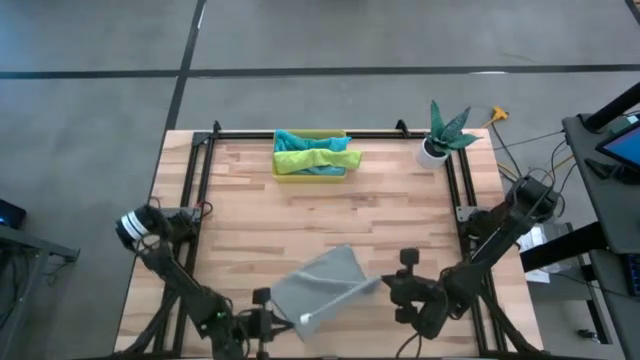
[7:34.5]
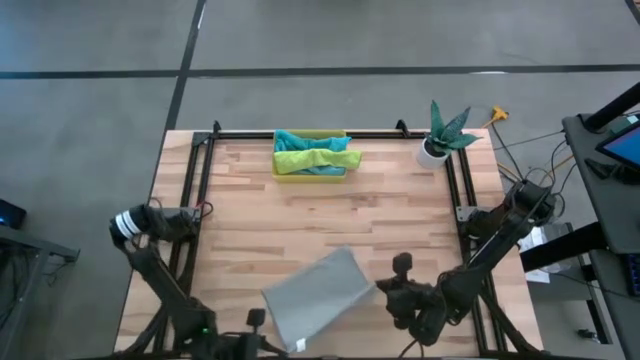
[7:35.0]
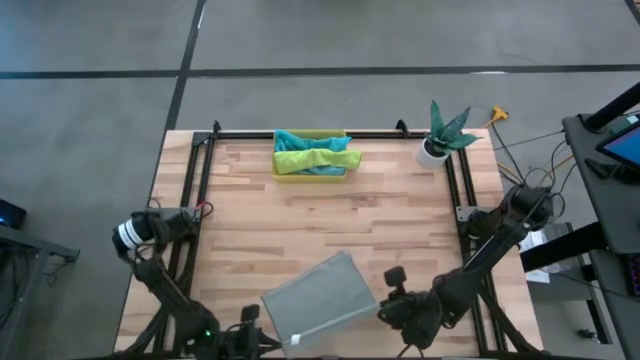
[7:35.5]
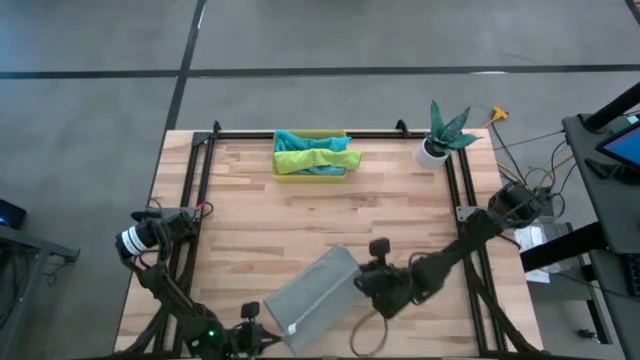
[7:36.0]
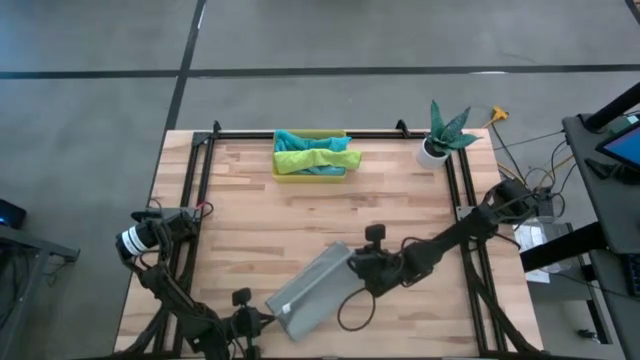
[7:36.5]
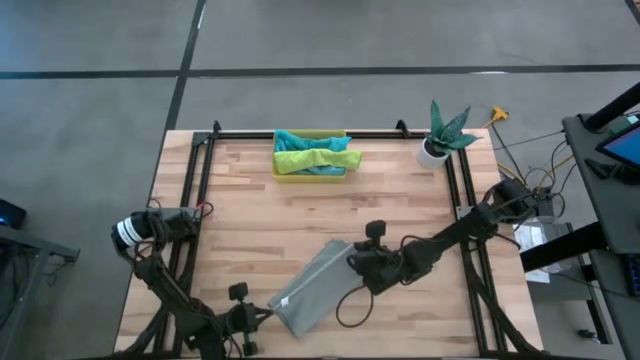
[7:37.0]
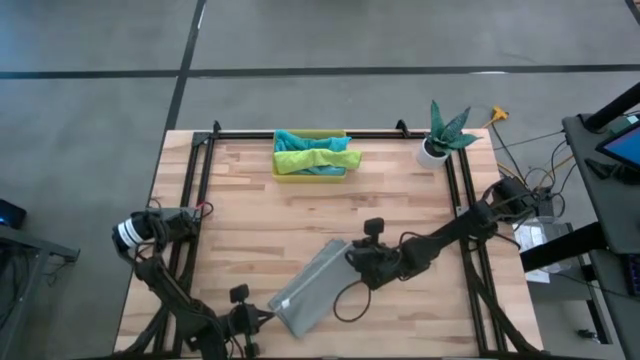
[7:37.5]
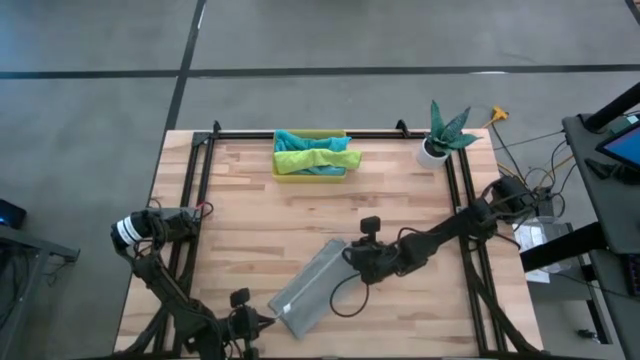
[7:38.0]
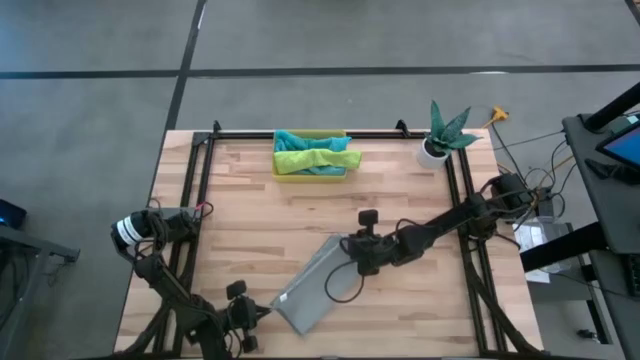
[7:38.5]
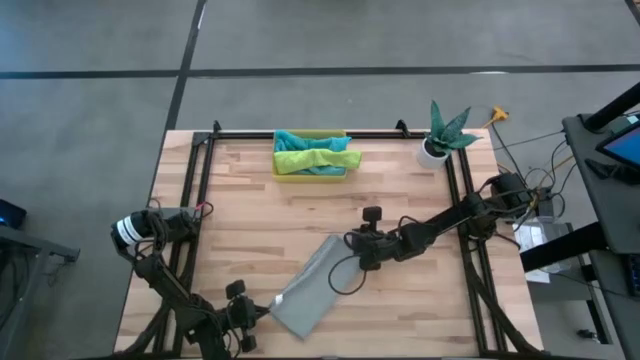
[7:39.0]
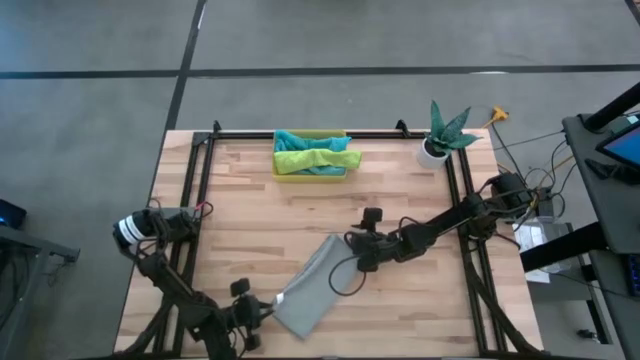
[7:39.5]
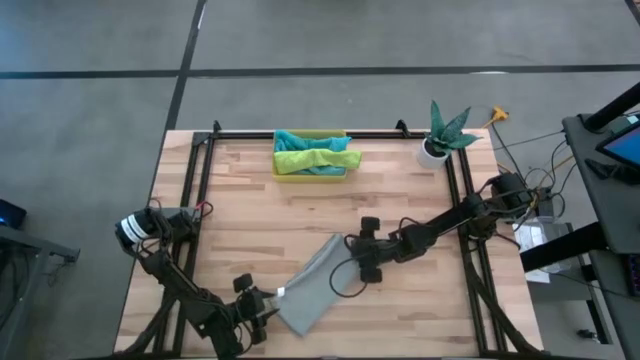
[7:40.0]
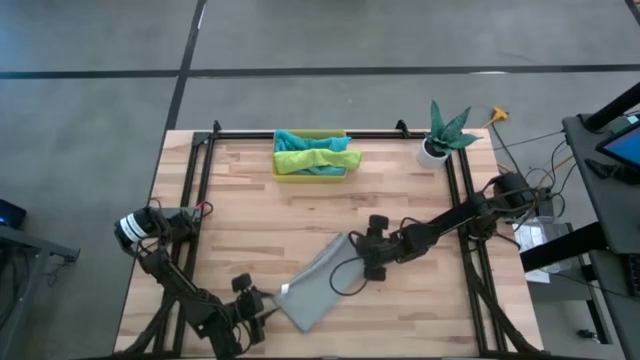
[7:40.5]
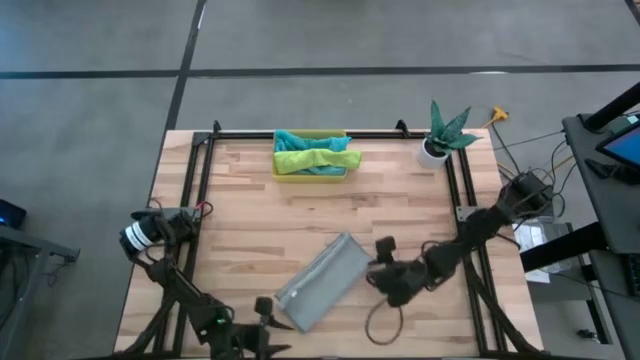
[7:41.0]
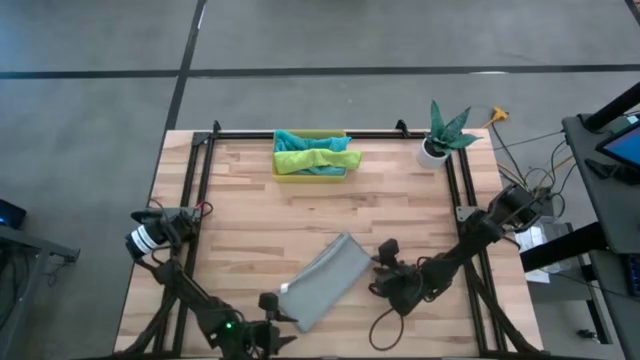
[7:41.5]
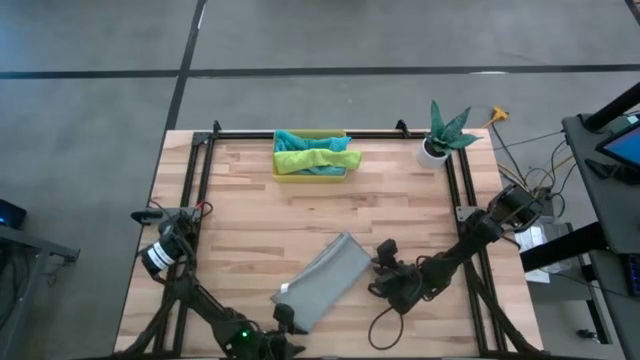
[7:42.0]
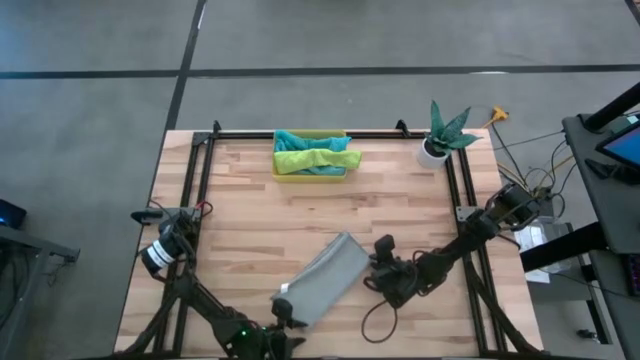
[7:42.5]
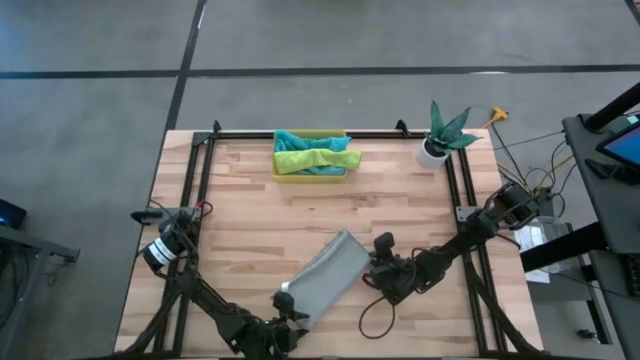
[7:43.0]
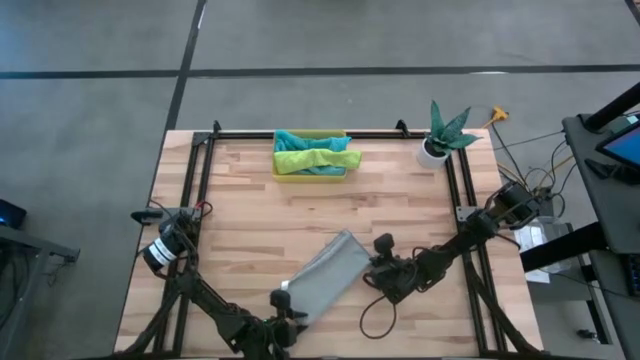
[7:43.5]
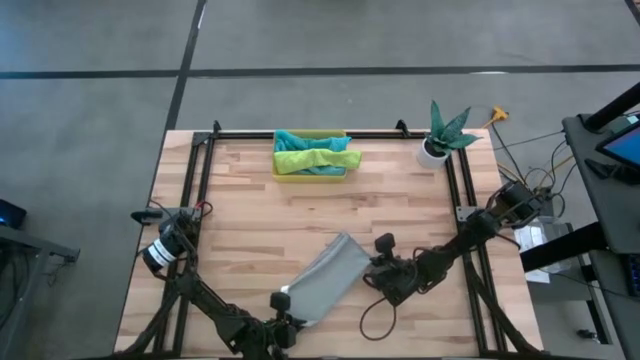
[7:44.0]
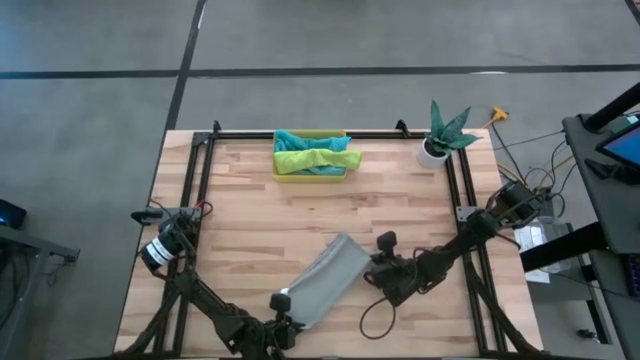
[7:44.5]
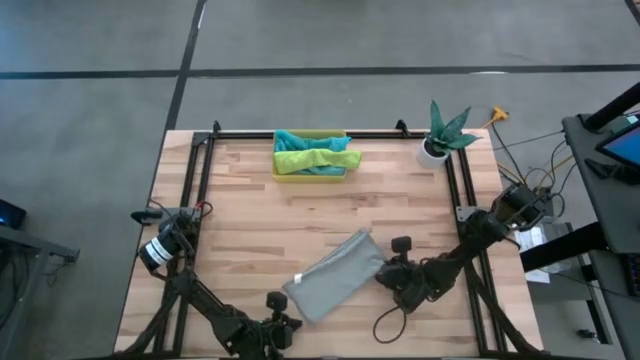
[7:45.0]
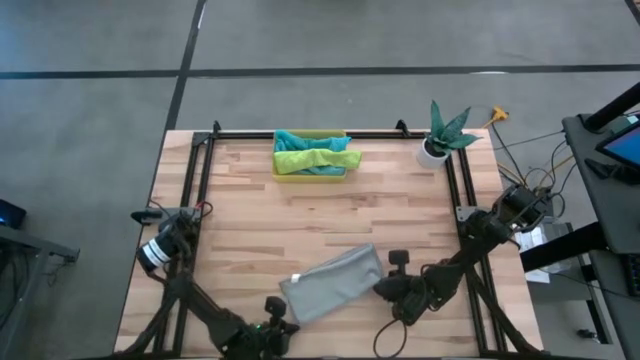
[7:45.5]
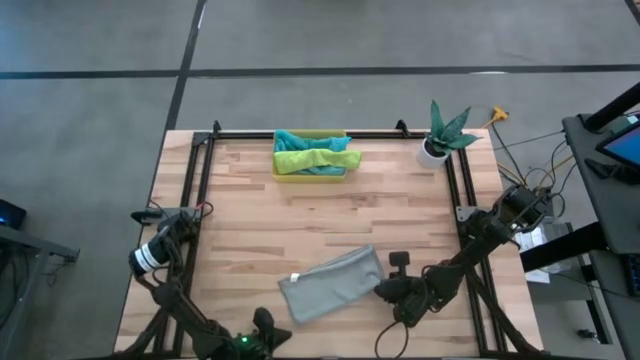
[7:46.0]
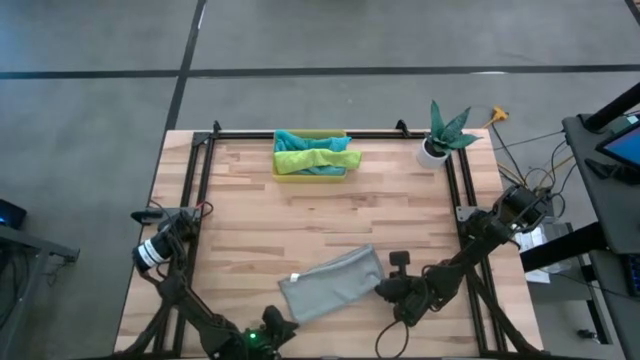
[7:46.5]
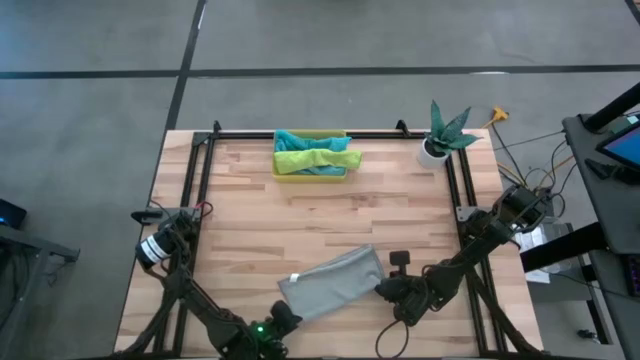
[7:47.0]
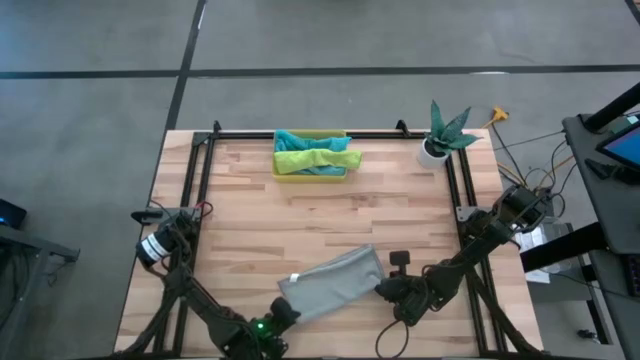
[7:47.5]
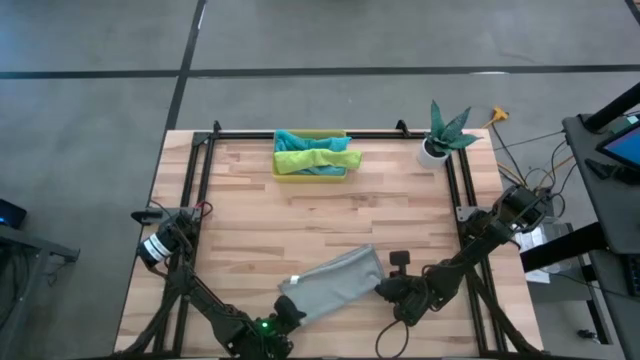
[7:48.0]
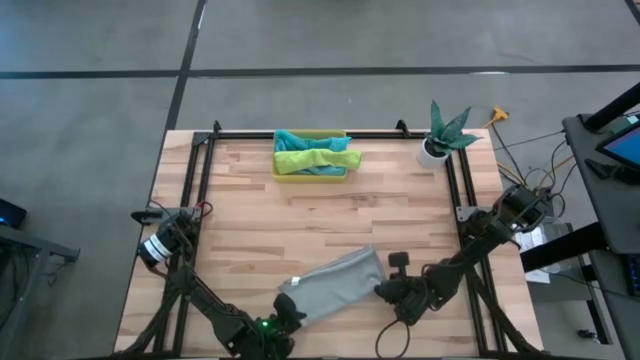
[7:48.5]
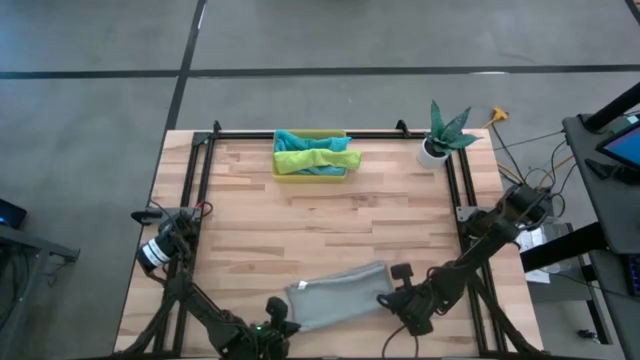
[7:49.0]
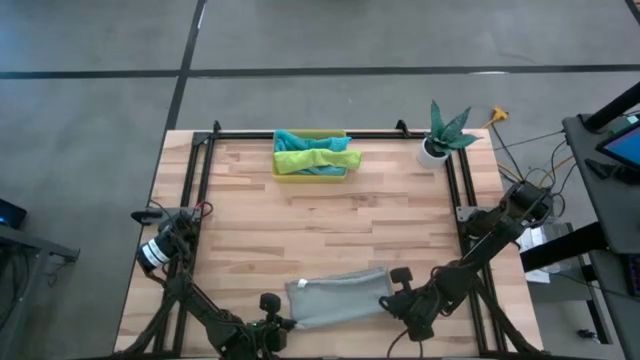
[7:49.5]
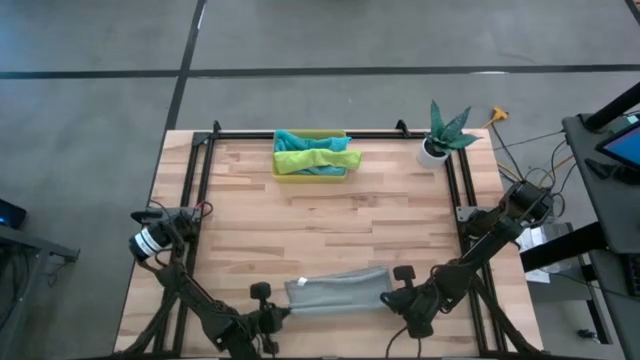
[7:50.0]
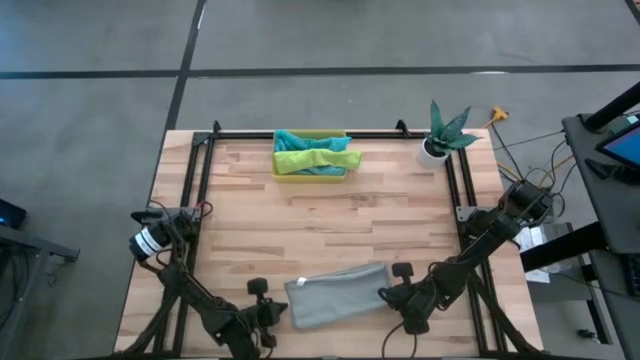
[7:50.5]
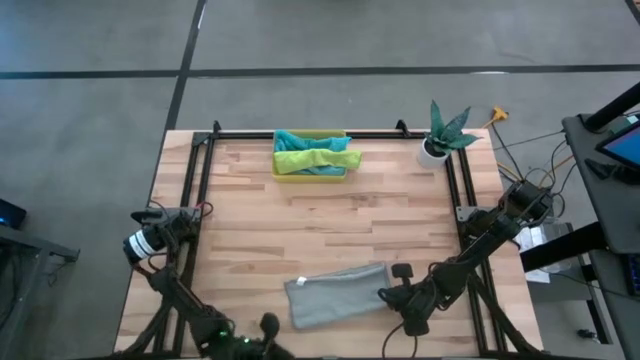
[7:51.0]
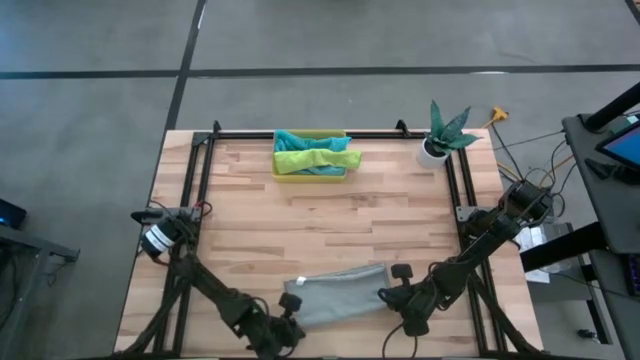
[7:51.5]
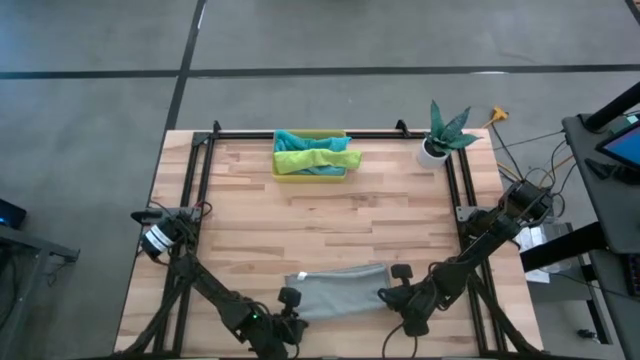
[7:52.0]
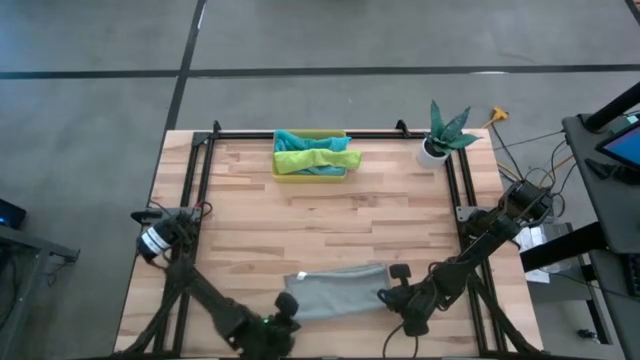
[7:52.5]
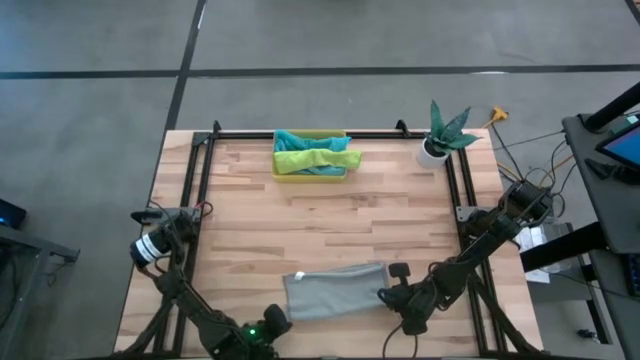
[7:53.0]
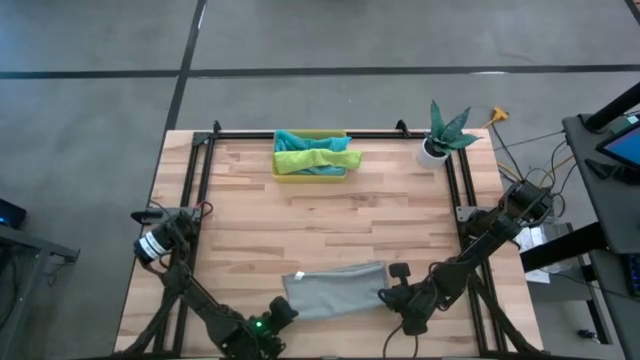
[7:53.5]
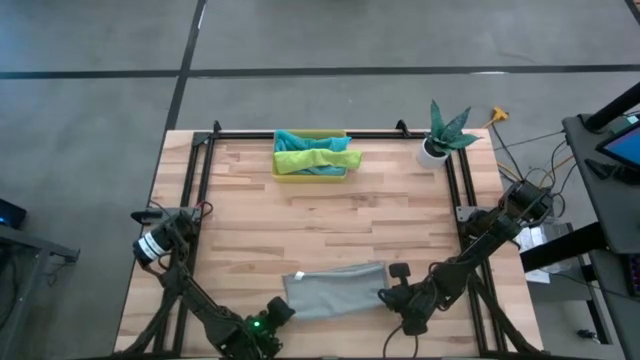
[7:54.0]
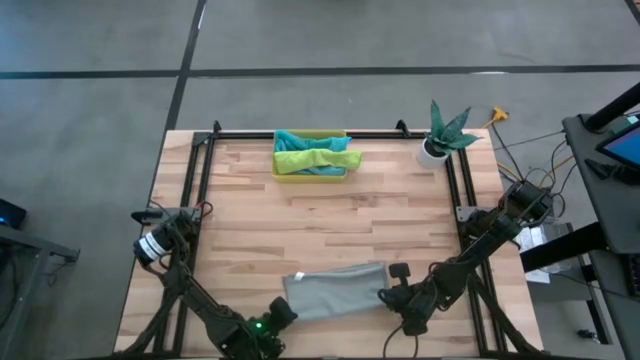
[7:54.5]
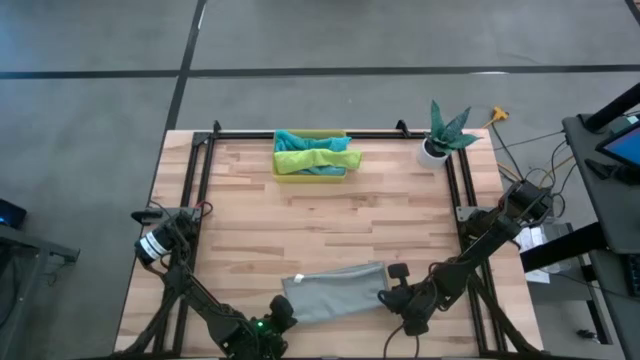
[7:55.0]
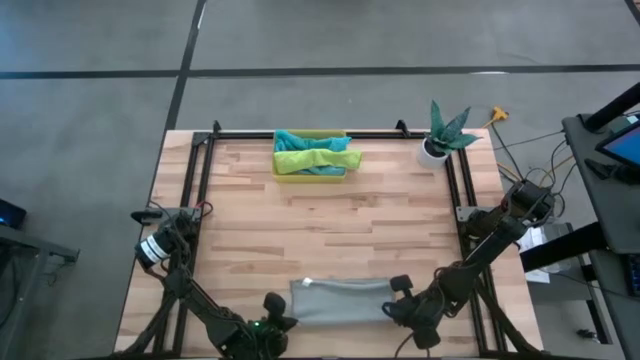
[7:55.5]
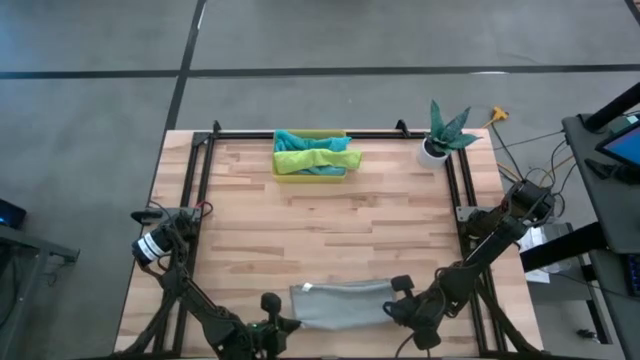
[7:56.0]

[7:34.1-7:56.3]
Task: Roll microfiber towels into tight, uniform cylinder then place into a basket
Roll the gray towel
